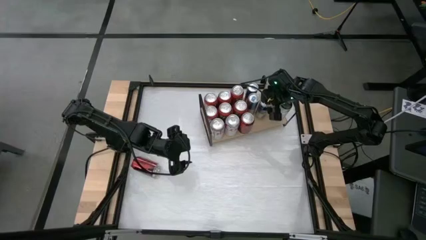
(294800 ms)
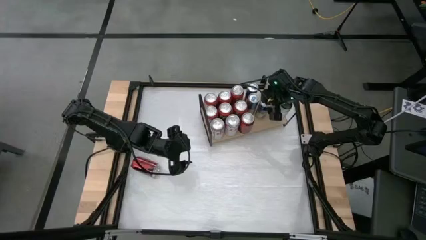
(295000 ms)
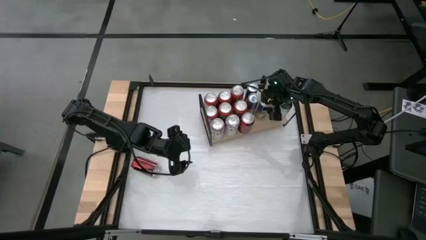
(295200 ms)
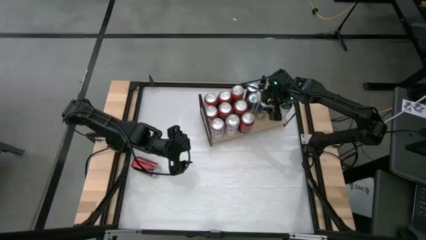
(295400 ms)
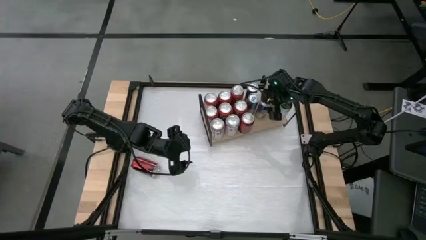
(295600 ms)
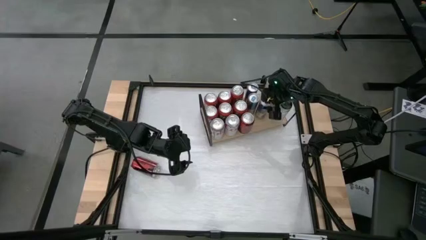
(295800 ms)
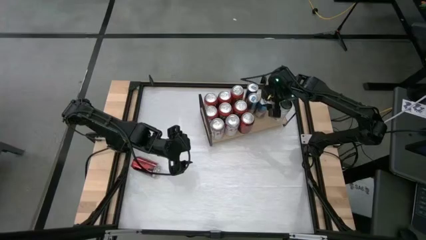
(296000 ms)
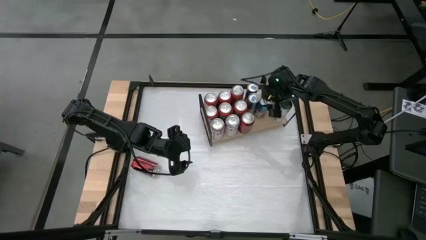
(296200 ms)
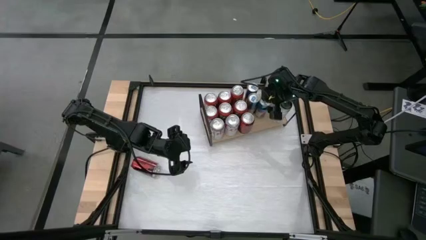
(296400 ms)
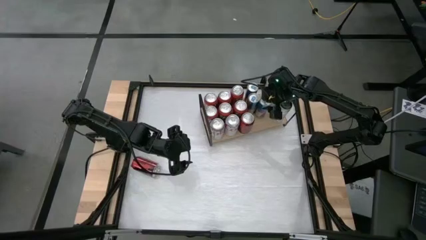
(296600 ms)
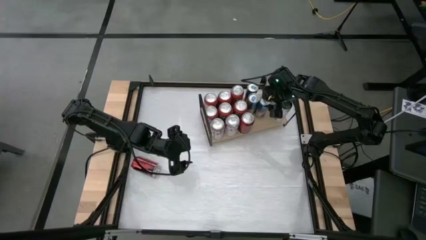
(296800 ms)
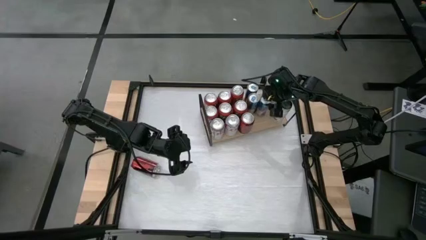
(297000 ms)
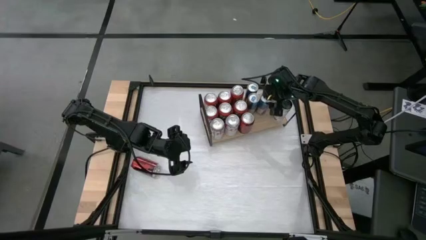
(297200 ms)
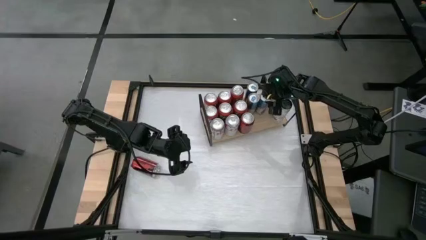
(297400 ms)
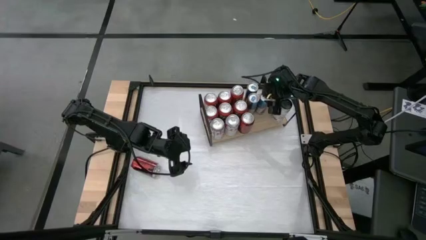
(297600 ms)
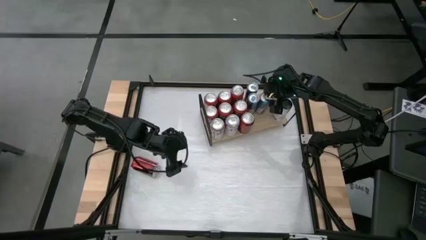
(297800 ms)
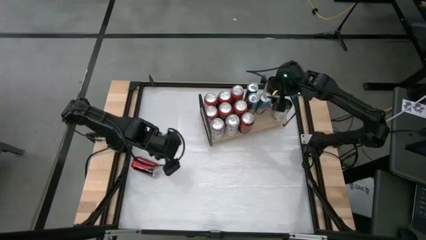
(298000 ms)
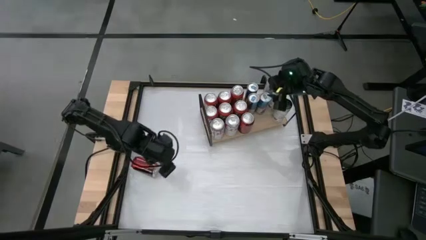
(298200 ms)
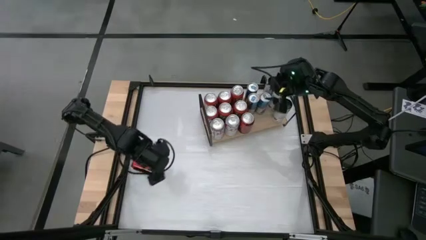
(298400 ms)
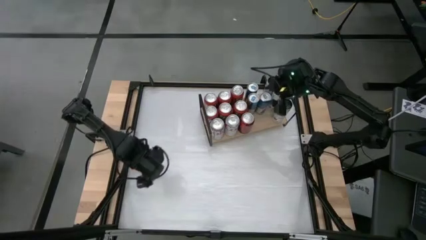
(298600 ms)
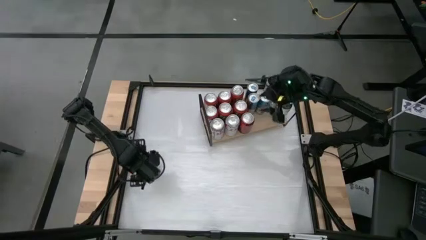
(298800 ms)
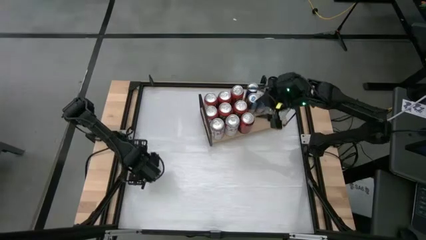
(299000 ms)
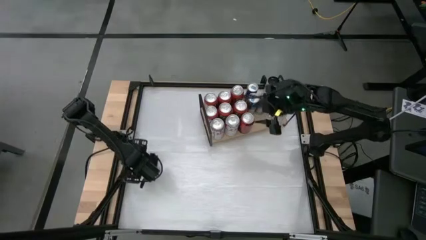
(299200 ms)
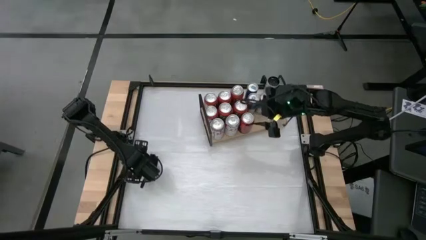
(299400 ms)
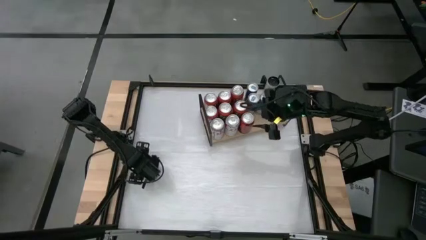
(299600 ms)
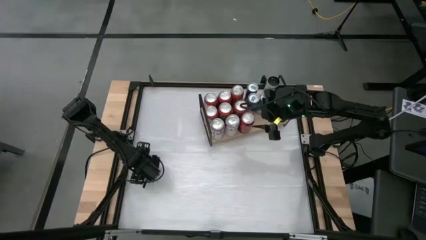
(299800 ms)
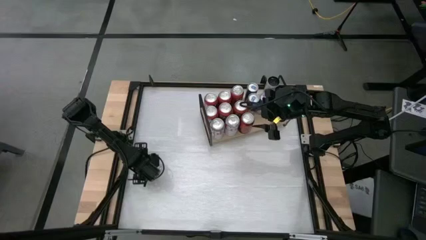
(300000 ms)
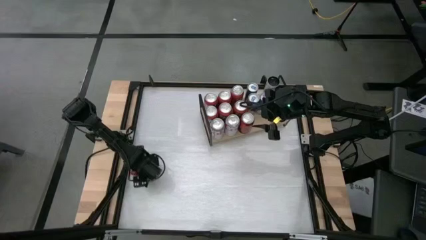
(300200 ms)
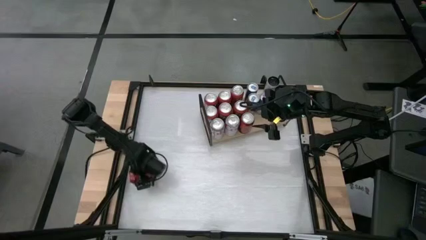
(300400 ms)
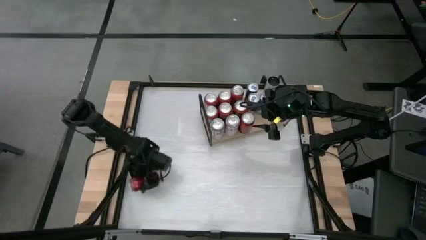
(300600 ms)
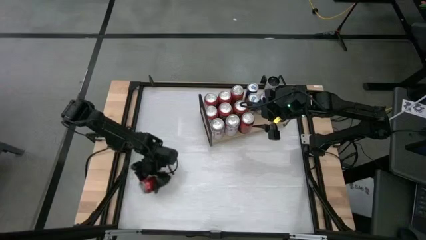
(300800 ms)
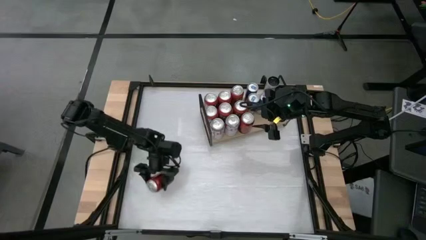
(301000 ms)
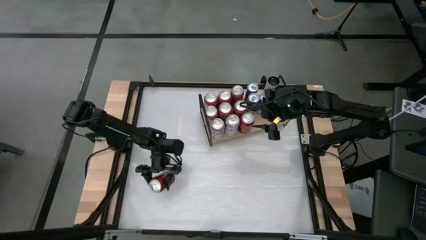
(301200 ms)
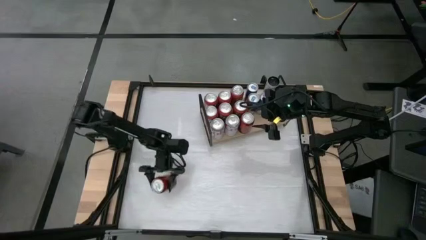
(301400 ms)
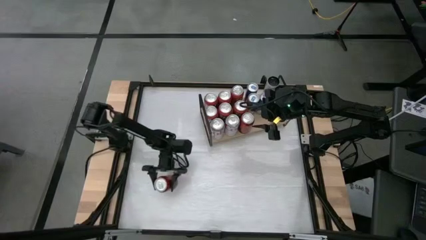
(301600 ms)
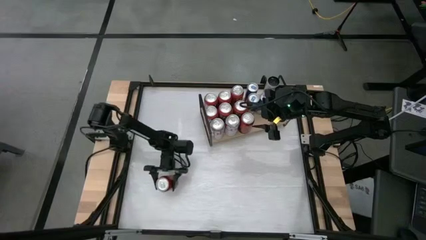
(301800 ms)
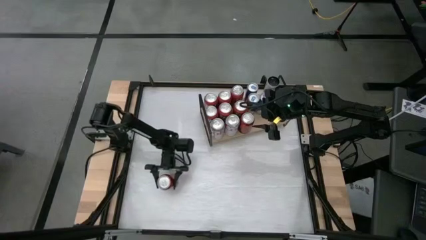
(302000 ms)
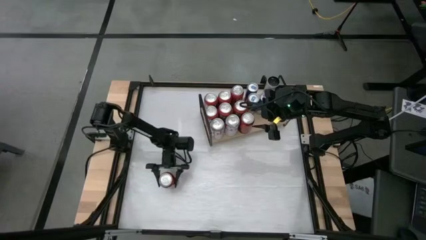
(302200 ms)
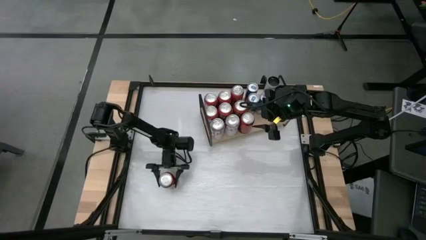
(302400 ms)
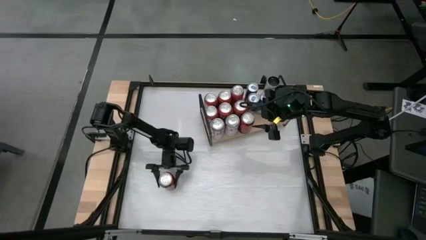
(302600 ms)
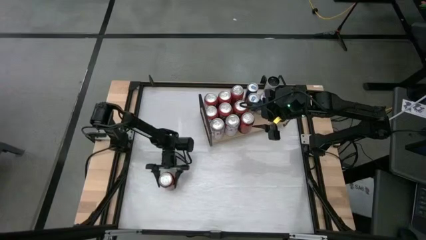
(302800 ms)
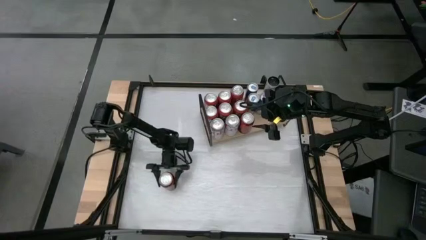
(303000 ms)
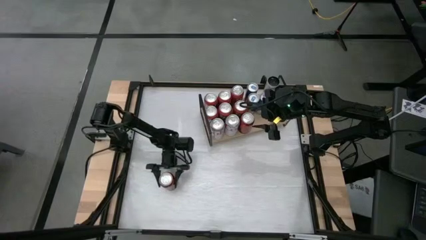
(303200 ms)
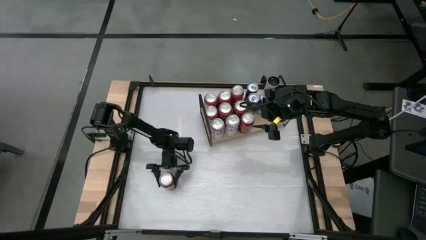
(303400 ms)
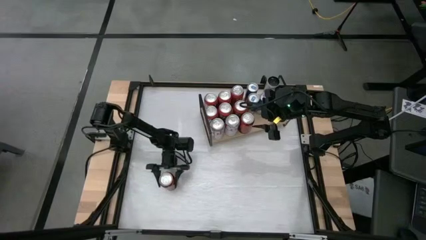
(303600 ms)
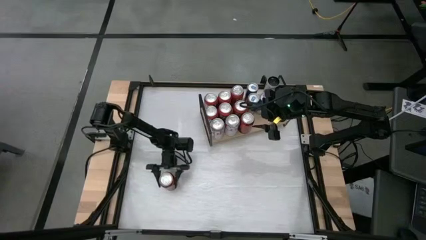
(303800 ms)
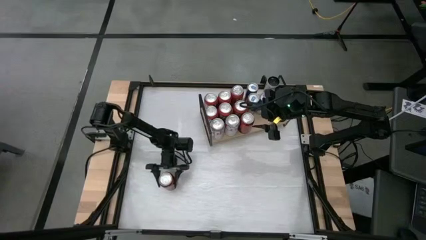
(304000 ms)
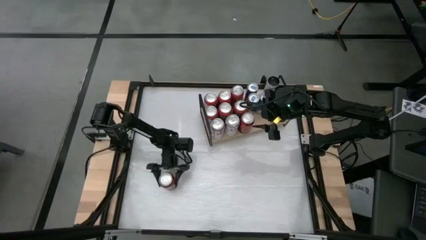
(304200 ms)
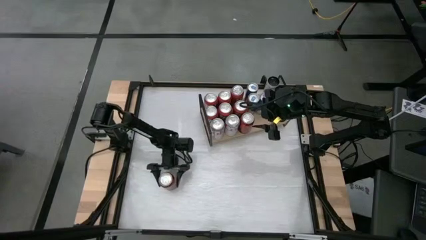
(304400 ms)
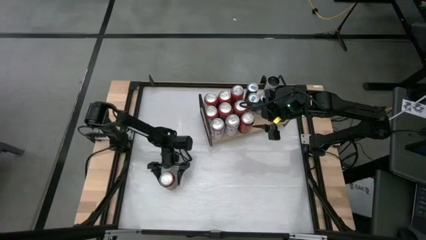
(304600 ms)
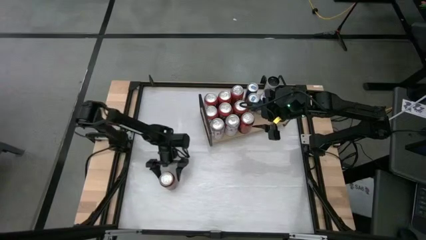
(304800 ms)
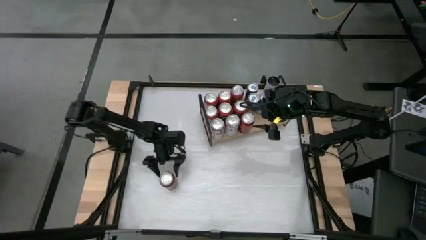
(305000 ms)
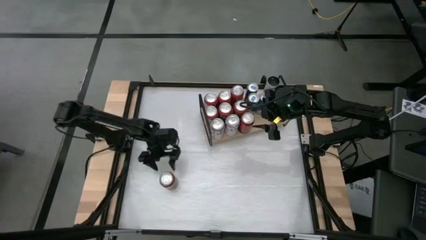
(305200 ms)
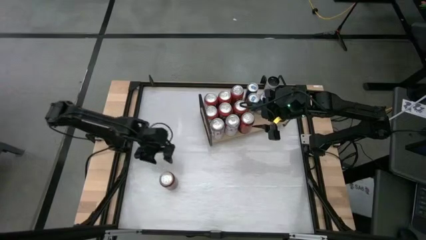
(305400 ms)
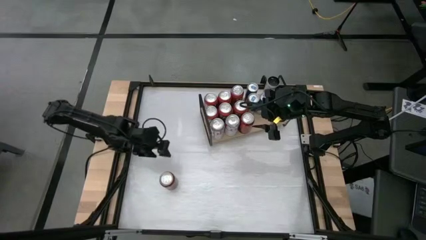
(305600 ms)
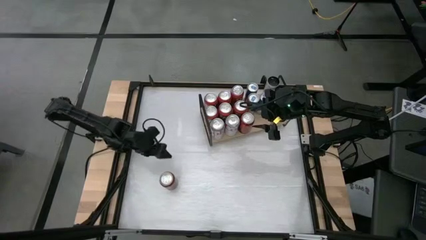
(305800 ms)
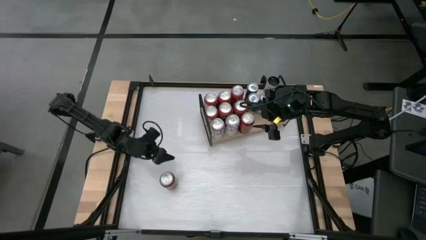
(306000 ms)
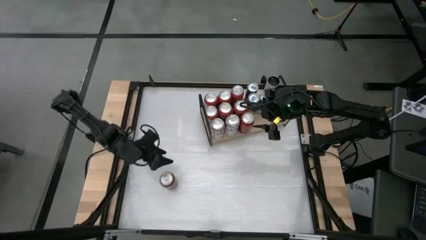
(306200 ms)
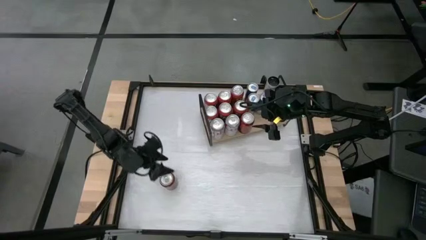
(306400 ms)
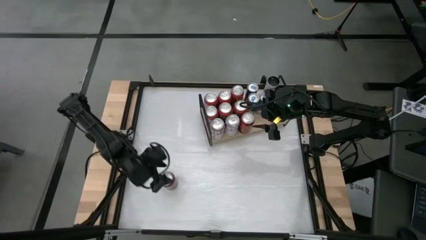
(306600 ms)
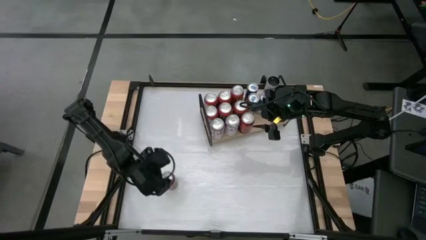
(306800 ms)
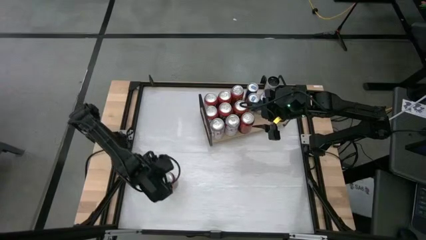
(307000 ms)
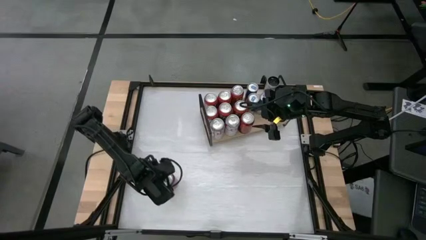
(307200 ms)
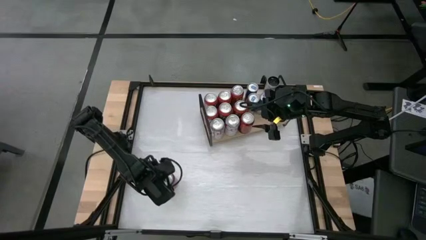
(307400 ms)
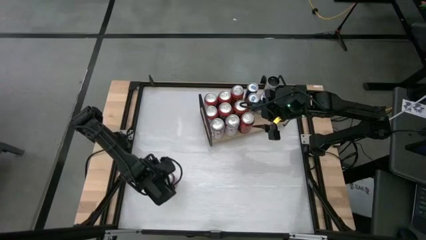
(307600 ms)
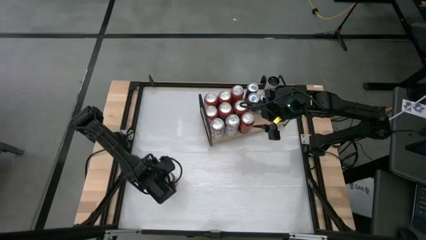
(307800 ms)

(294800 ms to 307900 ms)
Task: Place canned beverage on shelf
Put the red soda can on the shelf
